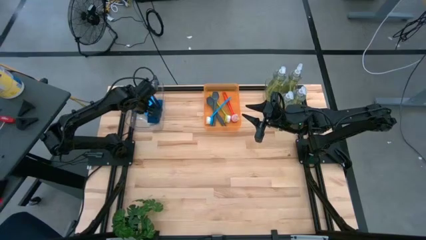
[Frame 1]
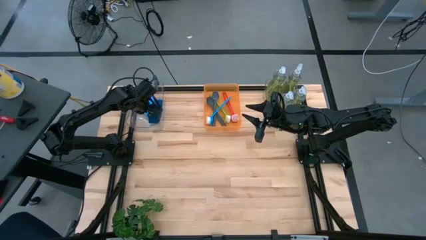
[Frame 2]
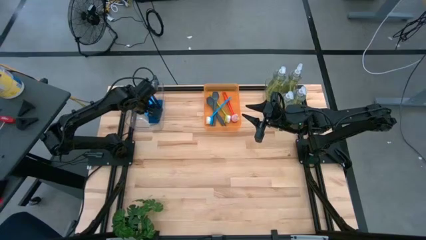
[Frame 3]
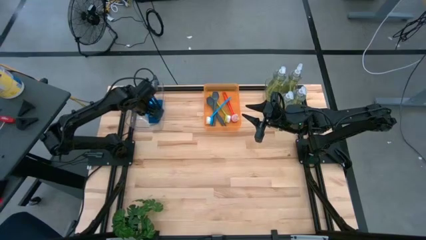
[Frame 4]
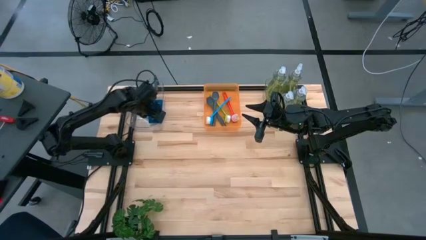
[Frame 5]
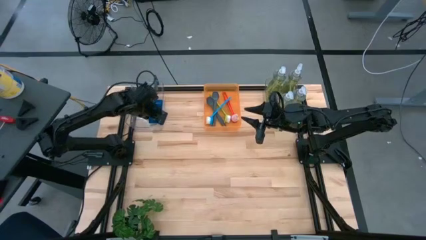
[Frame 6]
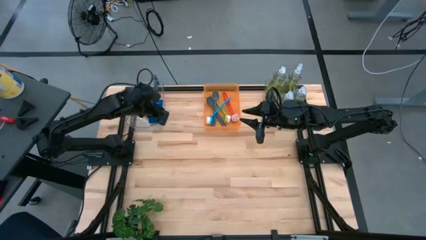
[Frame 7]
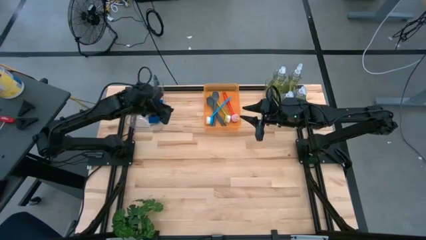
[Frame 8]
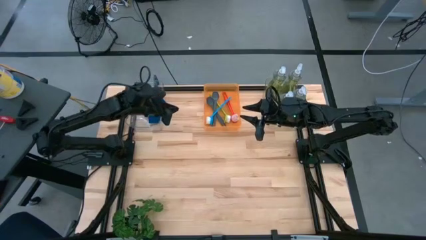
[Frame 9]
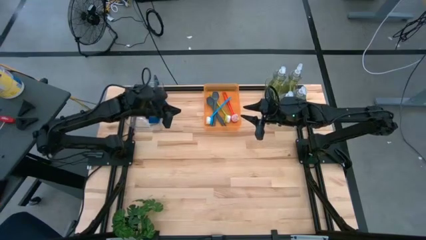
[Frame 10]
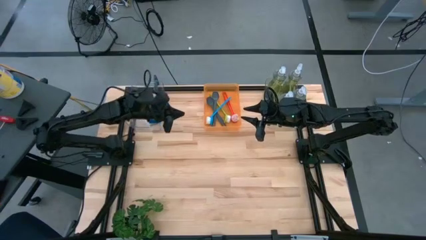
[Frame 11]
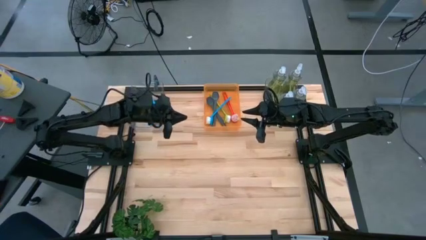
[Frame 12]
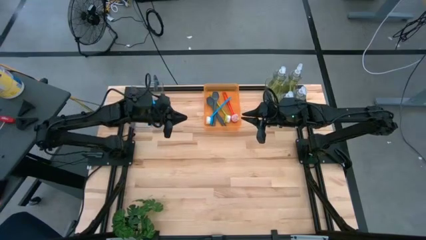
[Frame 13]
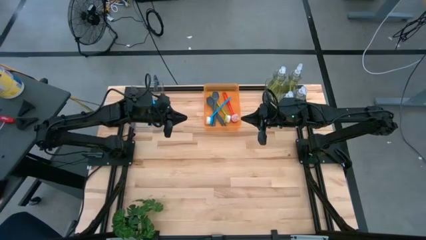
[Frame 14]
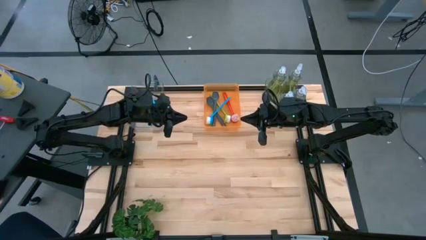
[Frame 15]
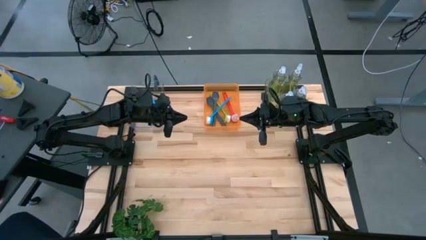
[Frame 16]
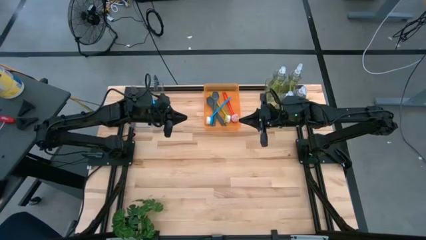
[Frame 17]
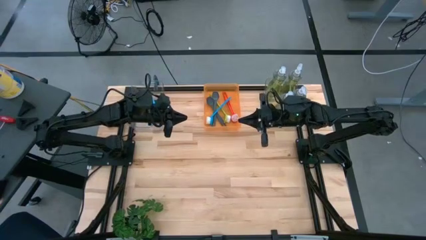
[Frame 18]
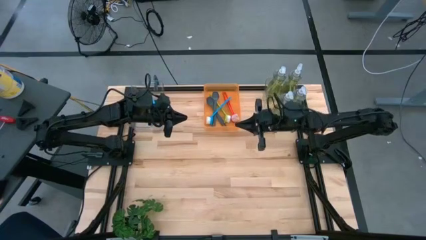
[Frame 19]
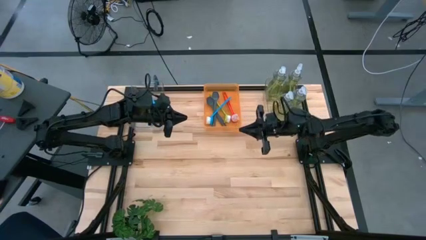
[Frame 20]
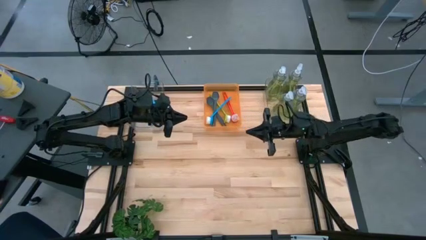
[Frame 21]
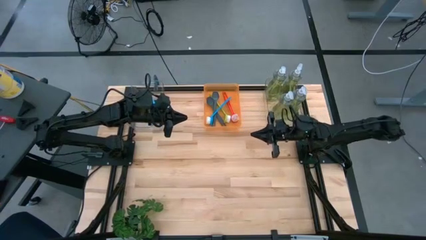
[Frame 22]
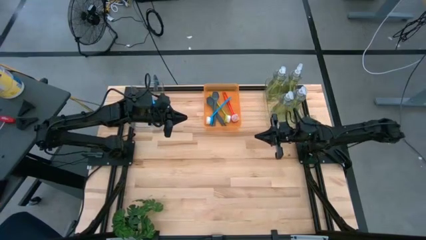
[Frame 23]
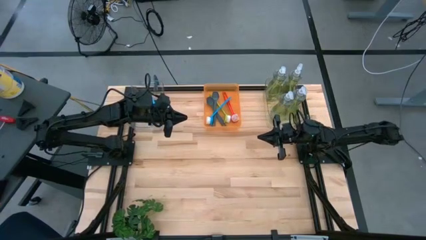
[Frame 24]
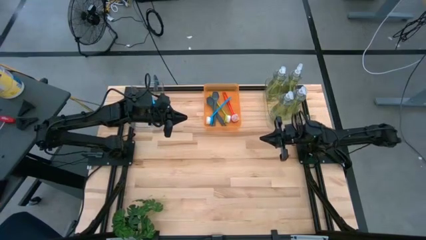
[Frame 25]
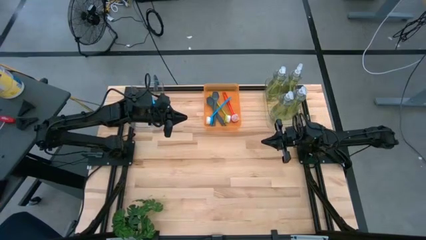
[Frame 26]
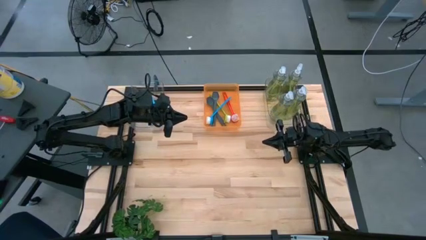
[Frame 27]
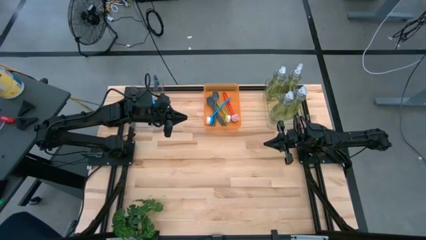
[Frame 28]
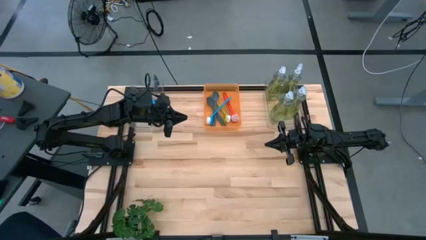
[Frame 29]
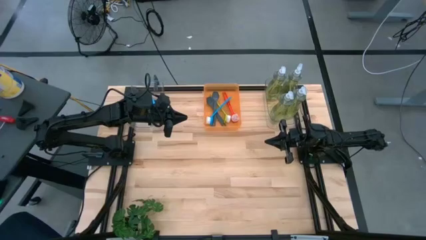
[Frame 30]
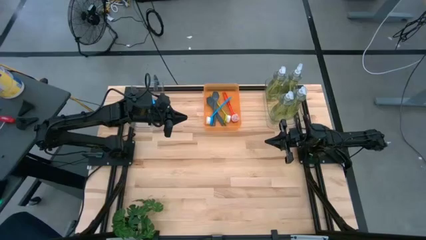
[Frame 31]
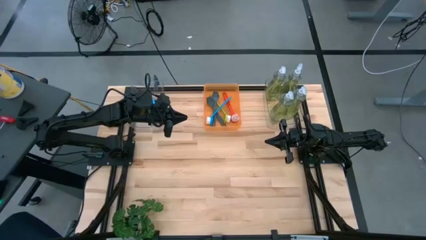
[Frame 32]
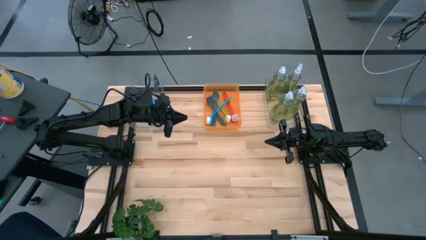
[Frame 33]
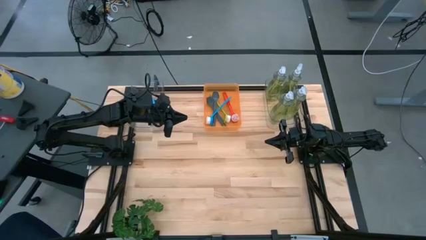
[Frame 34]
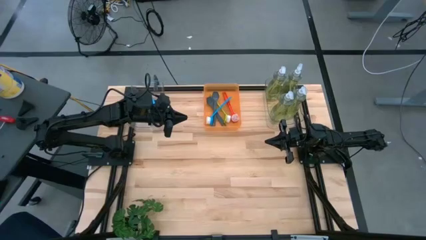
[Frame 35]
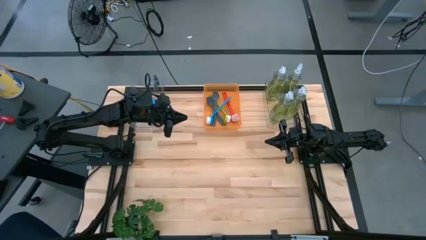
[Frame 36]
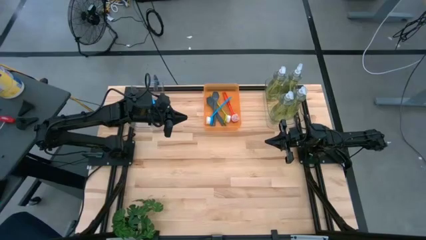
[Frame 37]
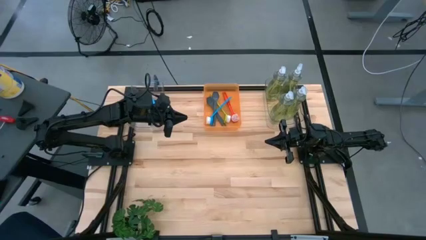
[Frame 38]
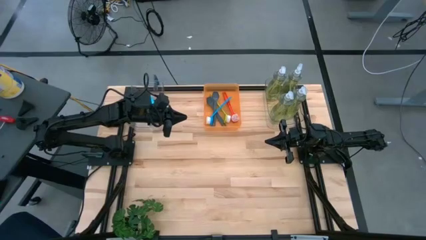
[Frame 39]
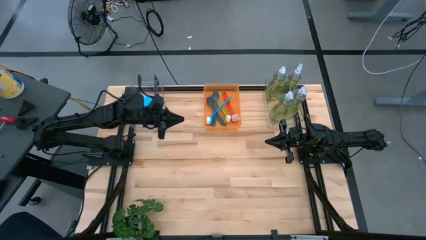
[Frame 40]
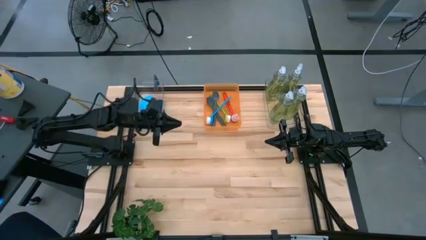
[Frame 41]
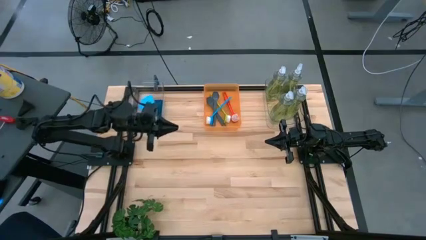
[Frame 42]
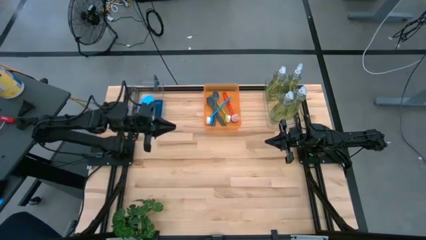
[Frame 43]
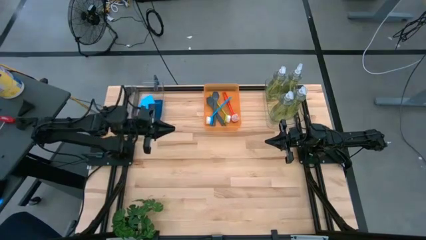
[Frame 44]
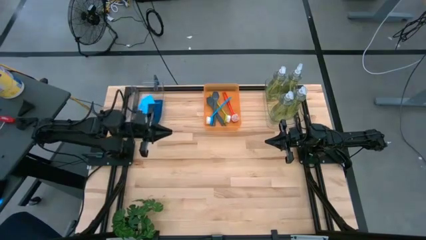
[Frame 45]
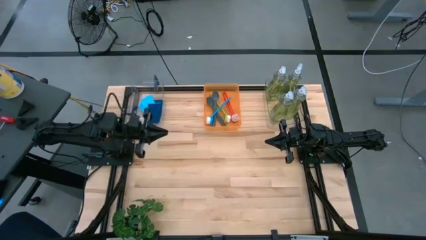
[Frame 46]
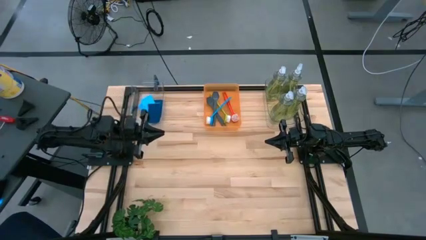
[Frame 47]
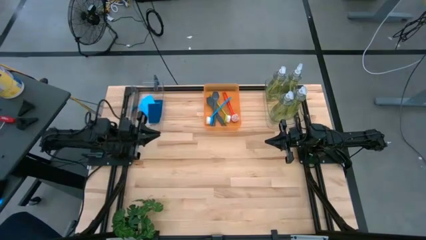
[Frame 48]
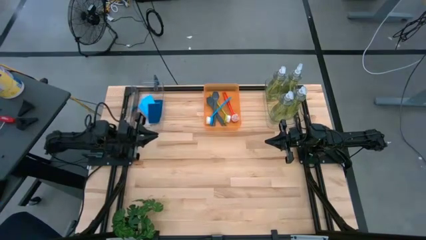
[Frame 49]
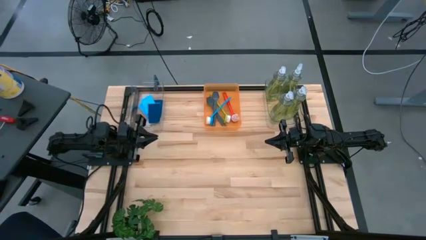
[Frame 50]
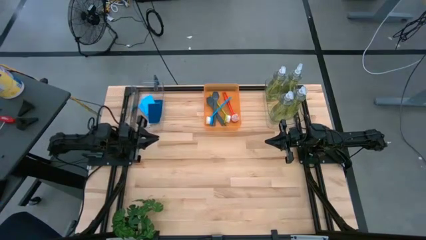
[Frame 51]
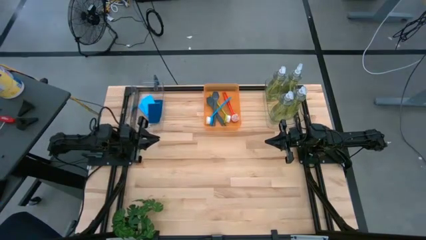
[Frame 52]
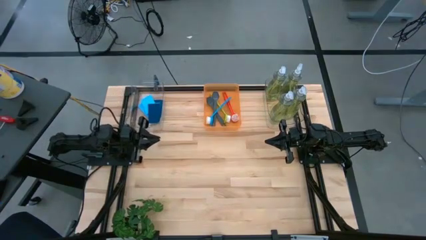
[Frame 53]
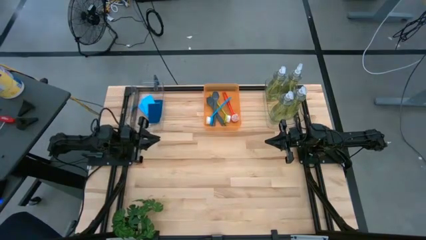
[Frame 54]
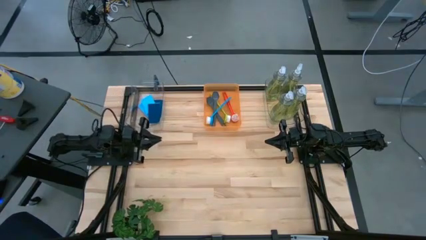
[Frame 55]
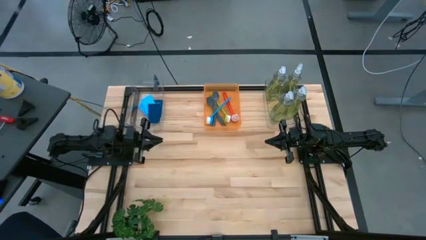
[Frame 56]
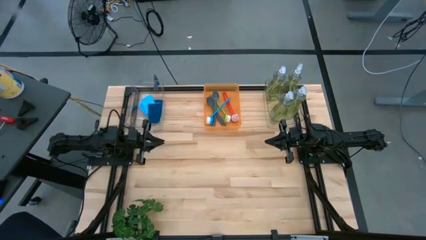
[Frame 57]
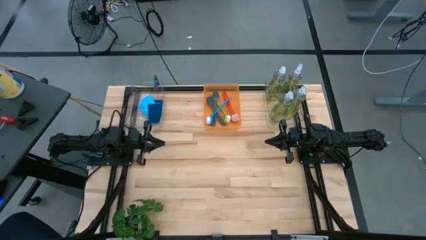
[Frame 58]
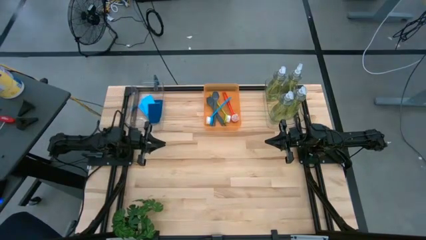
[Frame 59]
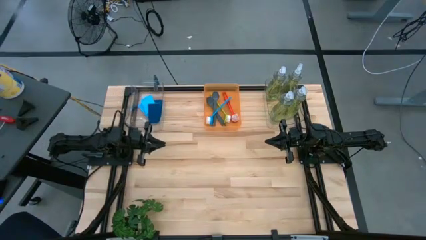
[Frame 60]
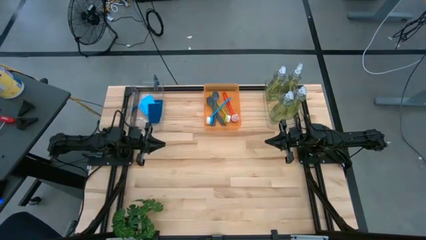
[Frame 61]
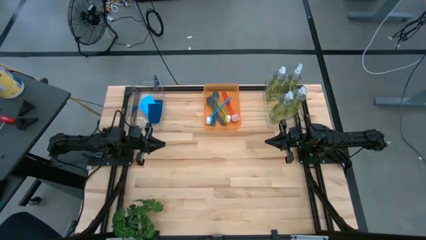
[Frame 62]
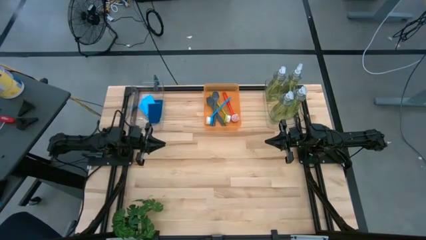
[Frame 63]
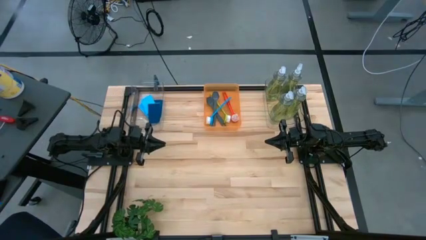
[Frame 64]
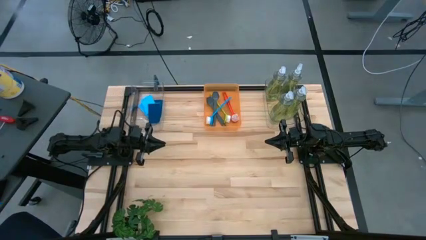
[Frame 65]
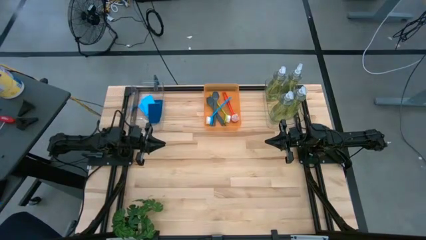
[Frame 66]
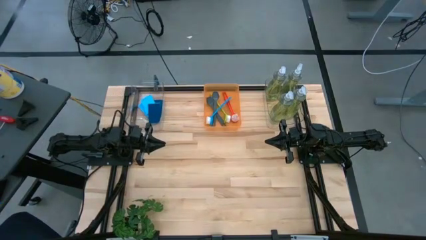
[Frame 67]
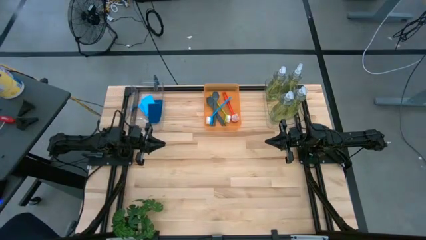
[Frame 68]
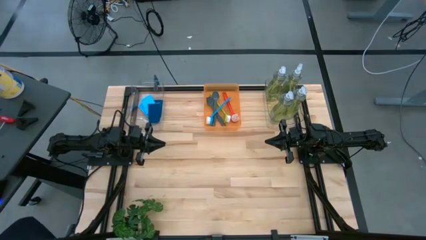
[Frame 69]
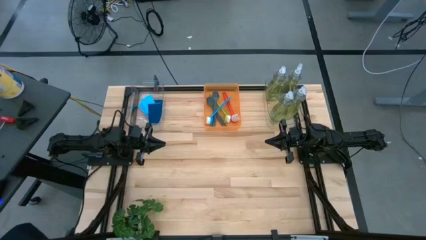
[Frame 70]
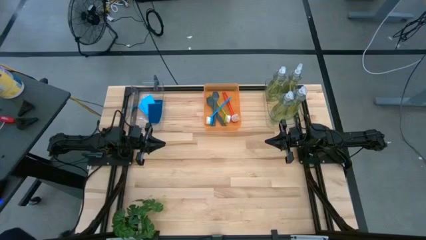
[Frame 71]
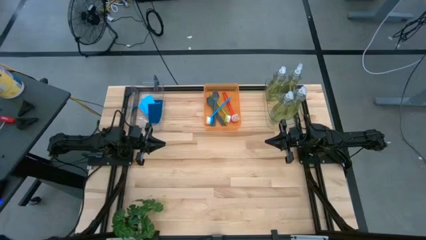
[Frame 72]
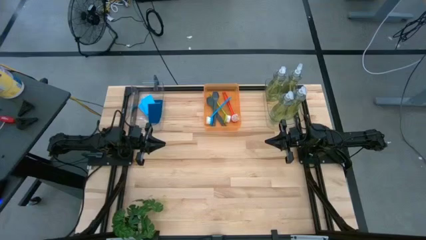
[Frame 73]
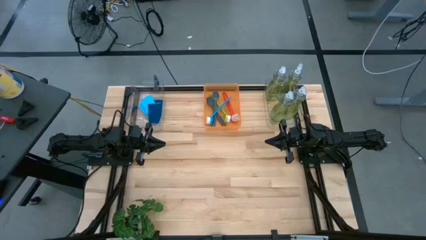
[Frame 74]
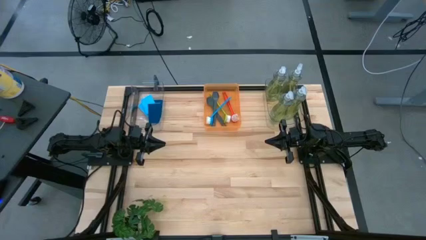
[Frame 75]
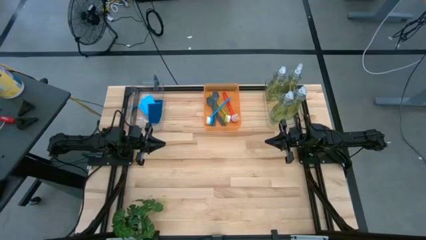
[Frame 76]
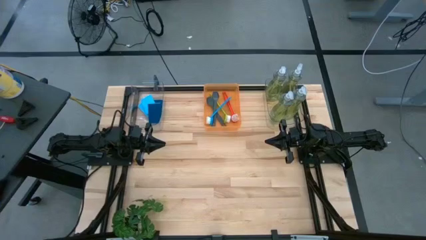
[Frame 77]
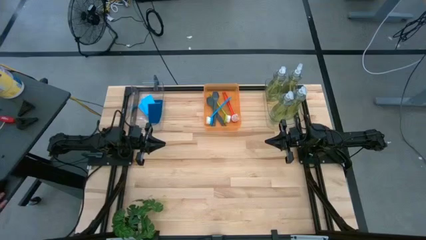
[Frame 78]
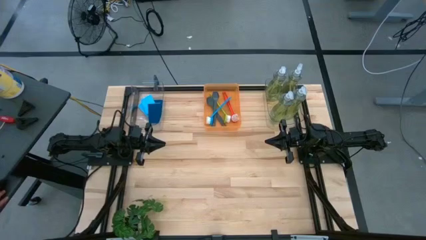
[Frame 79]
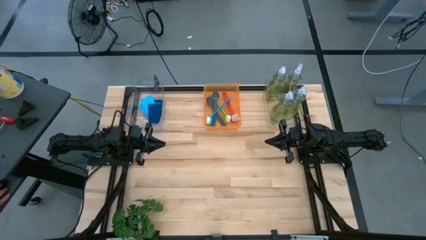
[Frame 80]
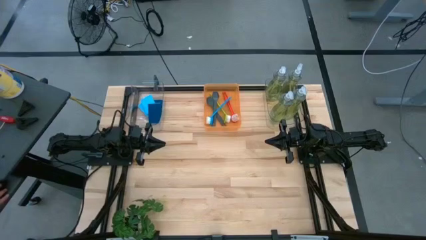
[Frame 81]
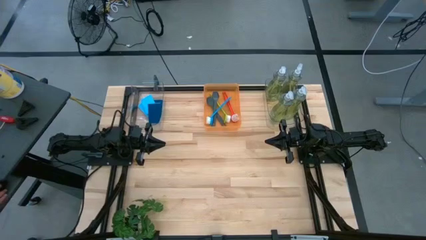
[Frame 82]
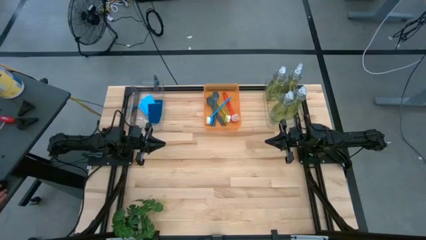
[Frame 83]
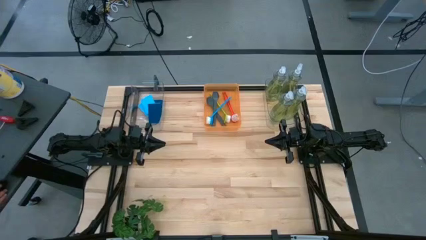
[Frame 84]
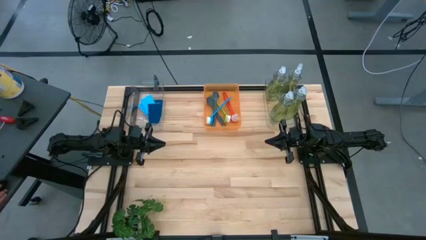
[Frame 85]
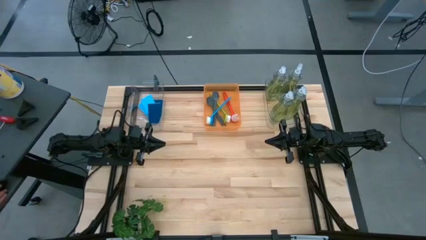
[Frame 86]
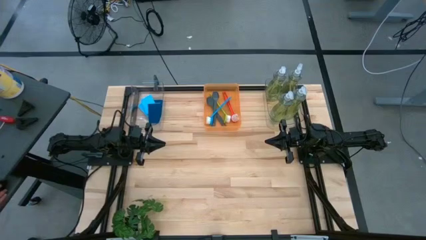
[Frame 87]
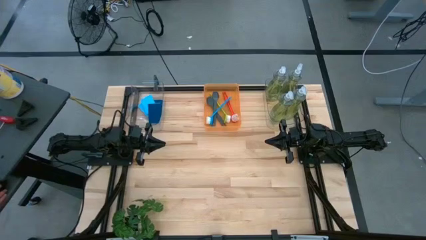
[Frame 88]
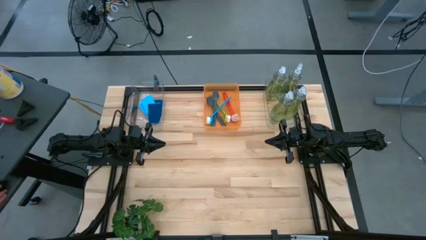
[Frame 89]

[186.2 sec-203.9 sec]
Task: Pick & Place Kitchen Sink Supplies
Return to Home Position
